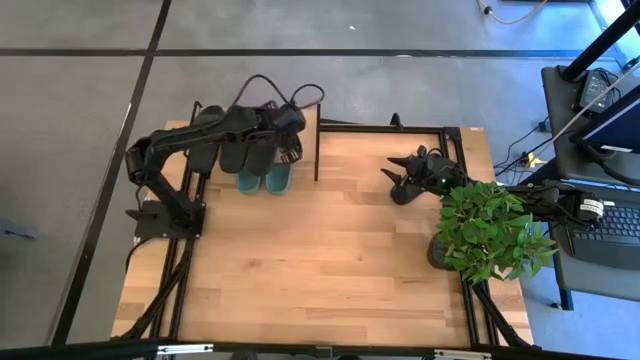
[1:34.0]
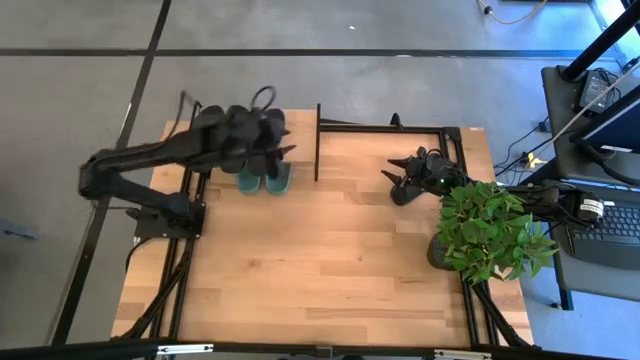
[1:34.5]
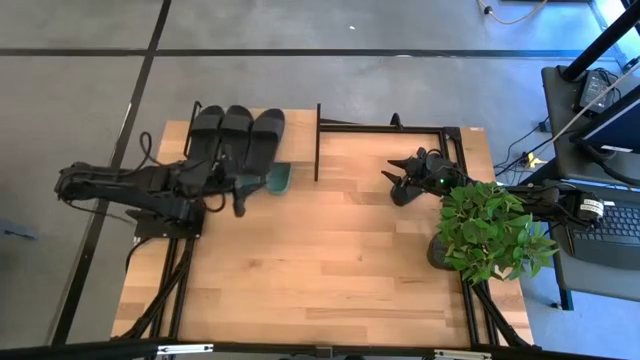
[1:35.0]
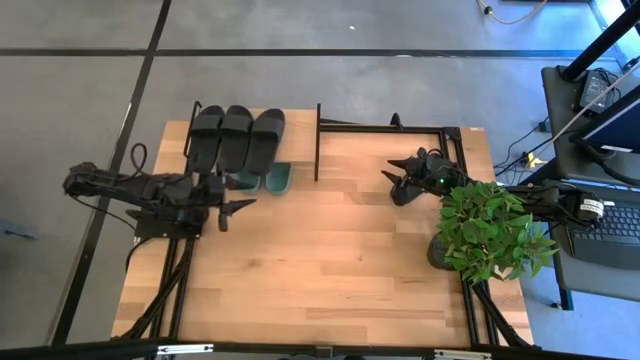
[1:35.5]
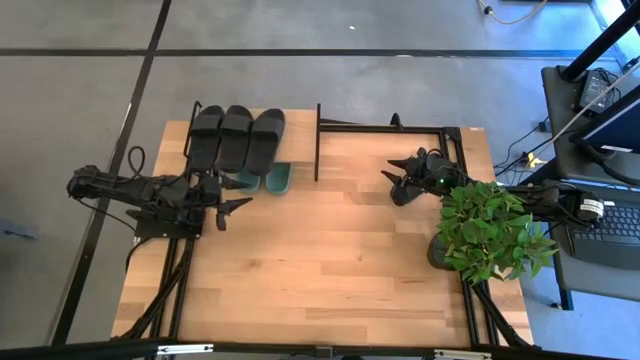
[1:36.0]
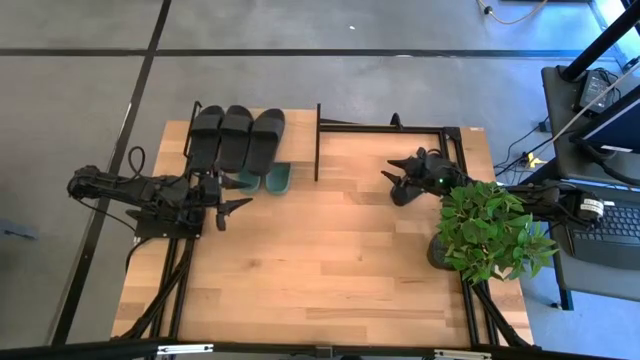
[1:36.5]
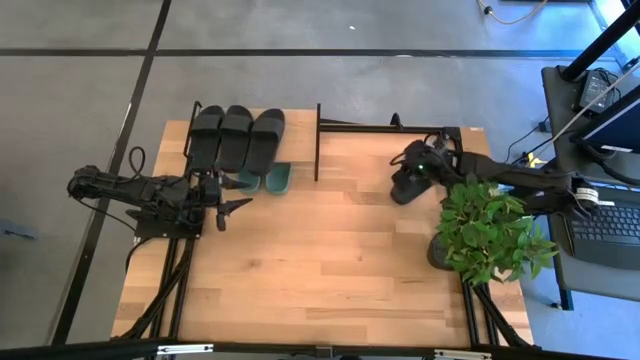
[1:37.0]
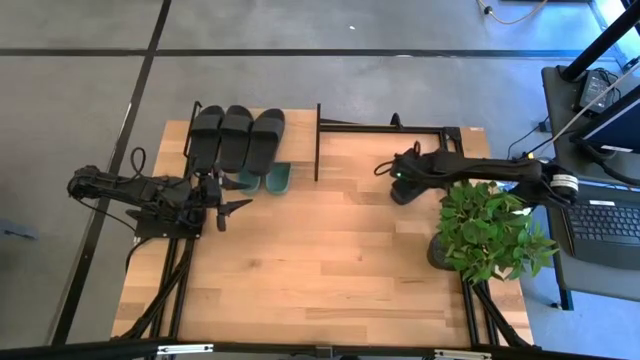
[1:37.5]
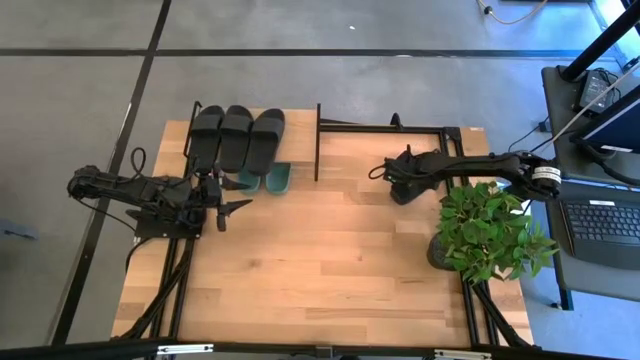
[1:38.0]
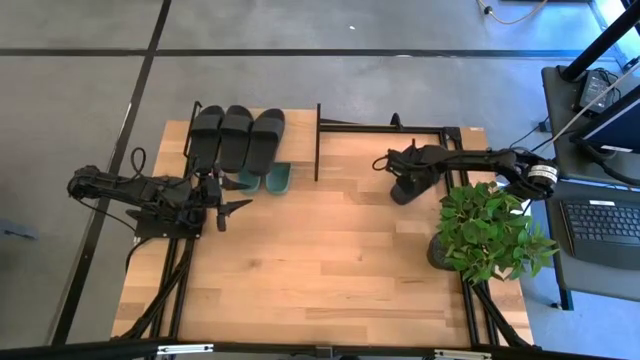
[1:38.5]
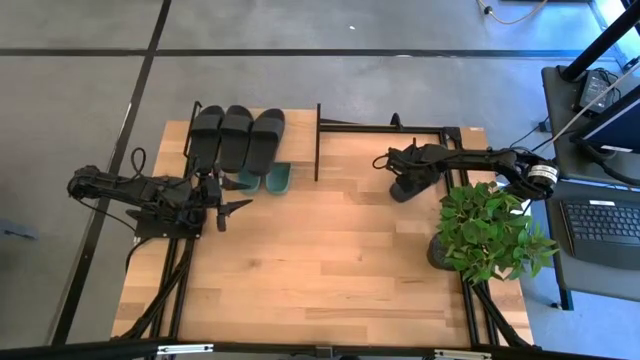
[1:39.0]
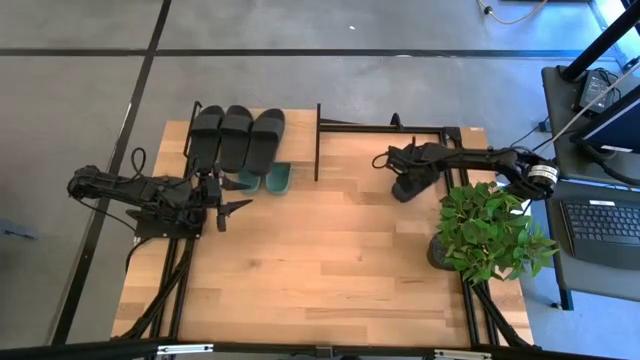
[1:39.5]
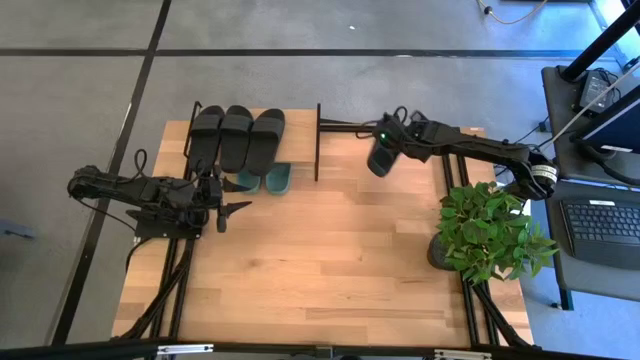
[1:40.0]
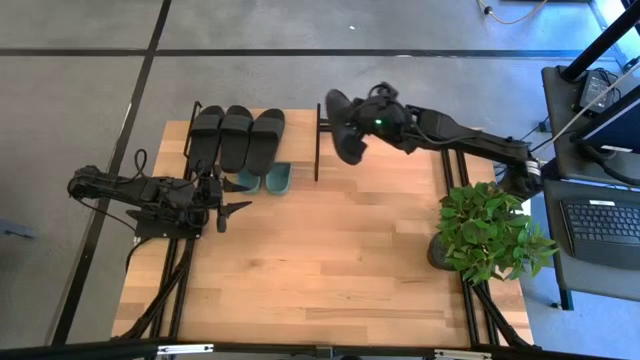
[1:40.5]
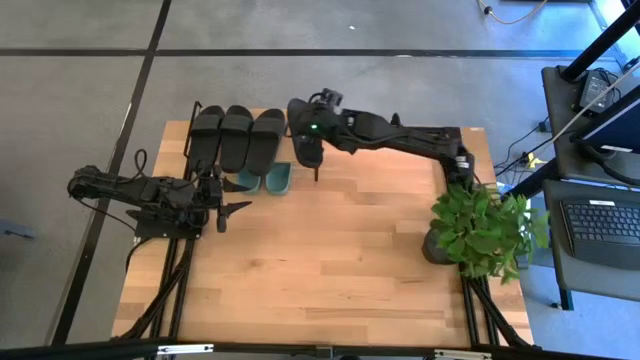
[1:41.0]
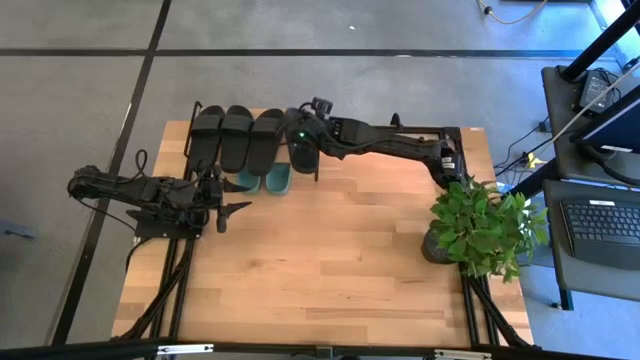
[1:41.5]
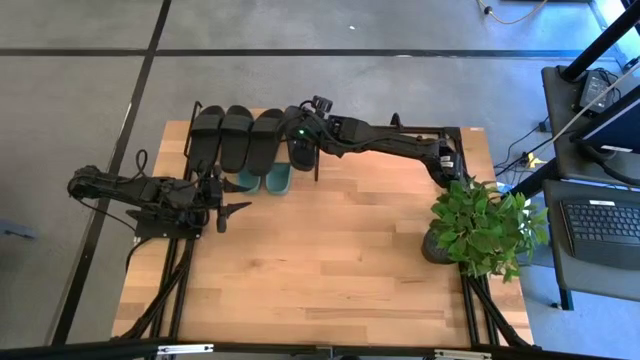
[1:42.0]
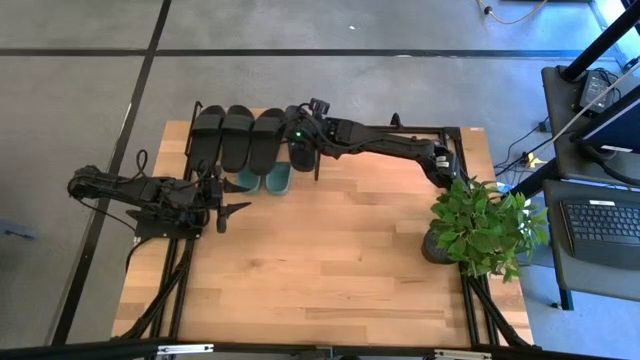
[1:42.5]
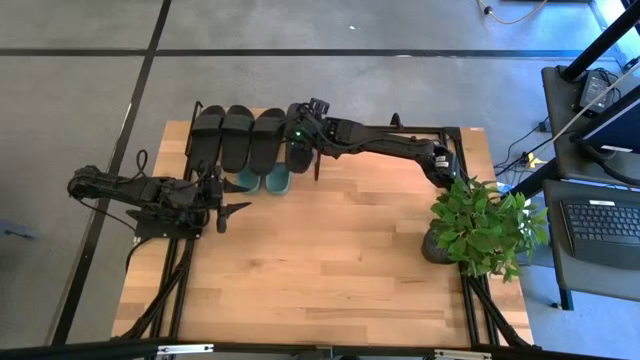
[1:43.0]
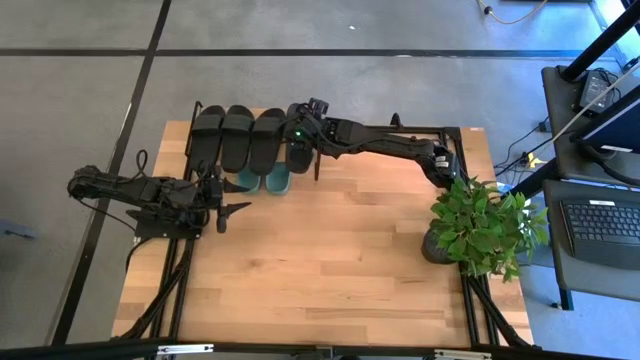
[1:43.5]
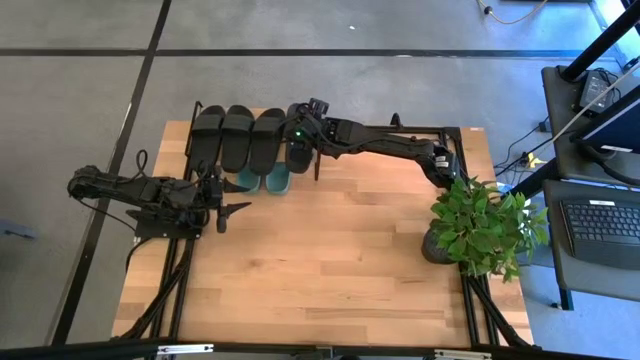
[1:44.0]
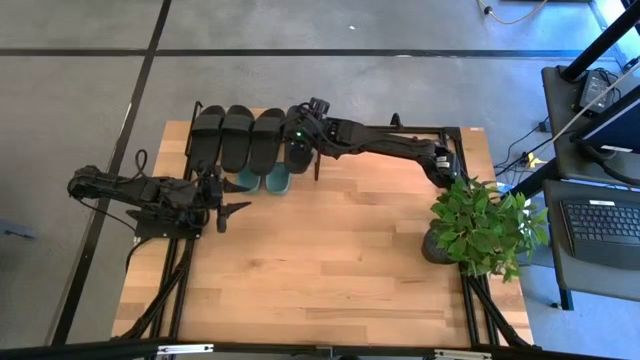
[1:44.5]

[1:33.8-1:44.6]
Task: Pick and place slides into the shelf
Put the black slipper on the shelf

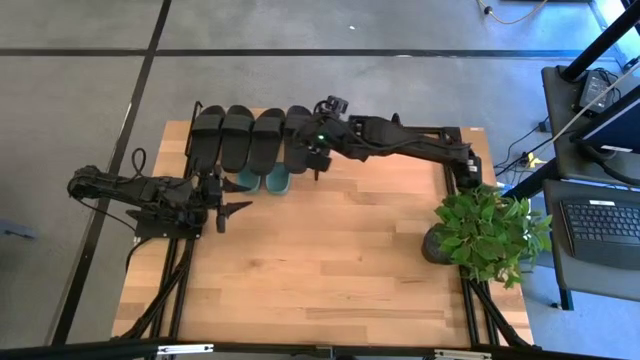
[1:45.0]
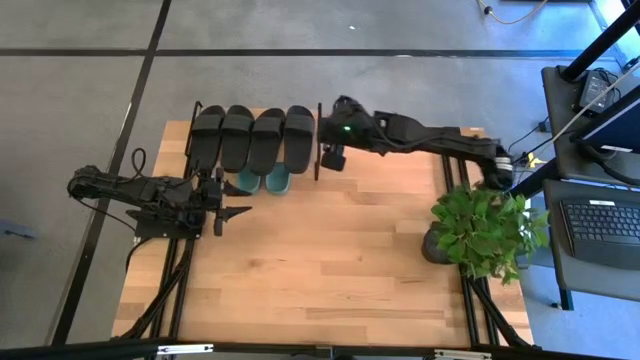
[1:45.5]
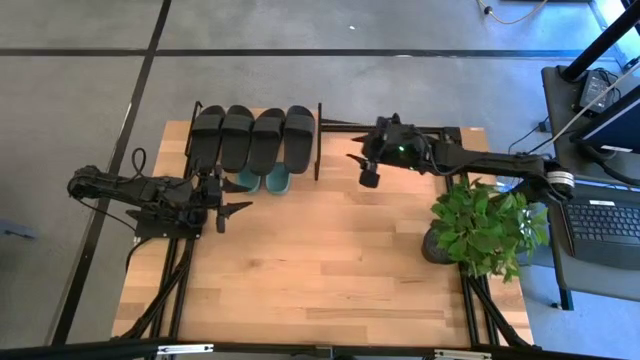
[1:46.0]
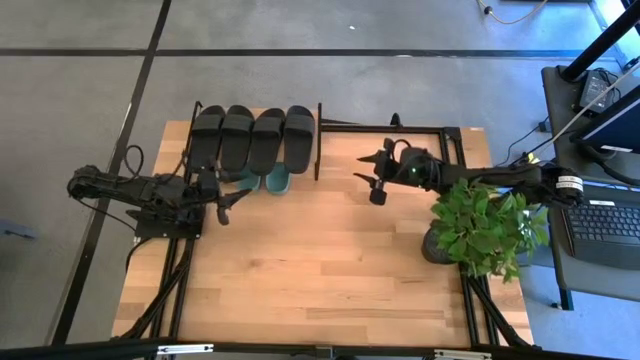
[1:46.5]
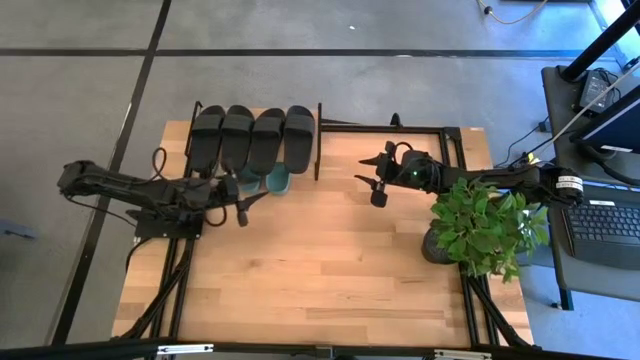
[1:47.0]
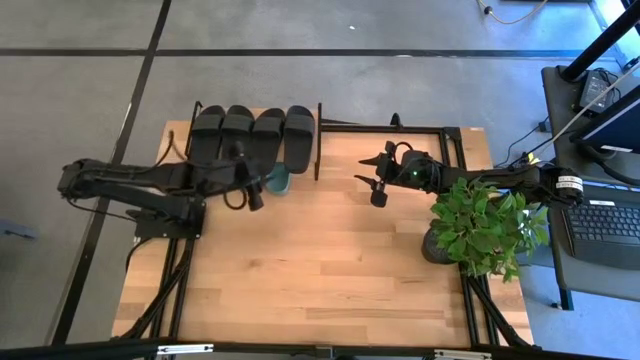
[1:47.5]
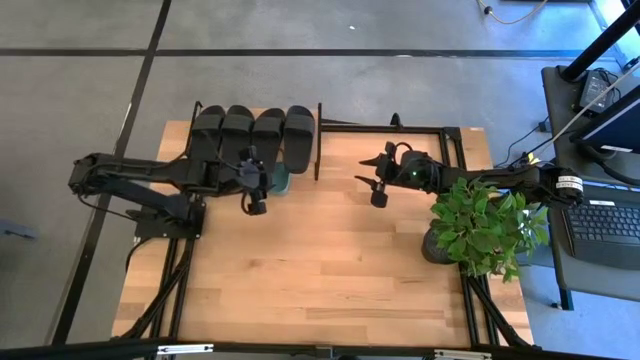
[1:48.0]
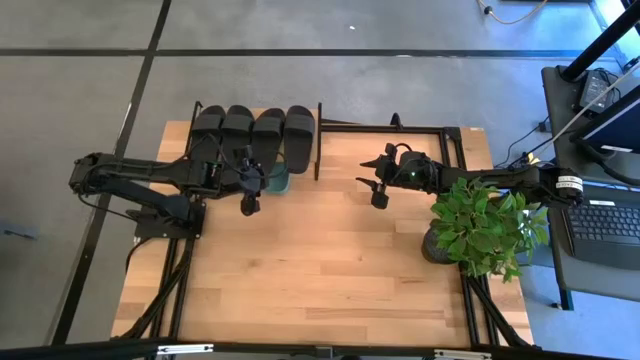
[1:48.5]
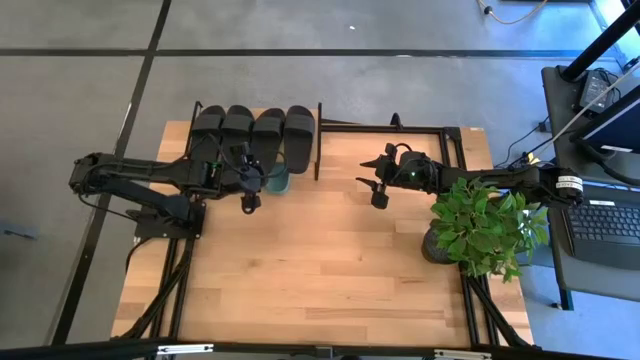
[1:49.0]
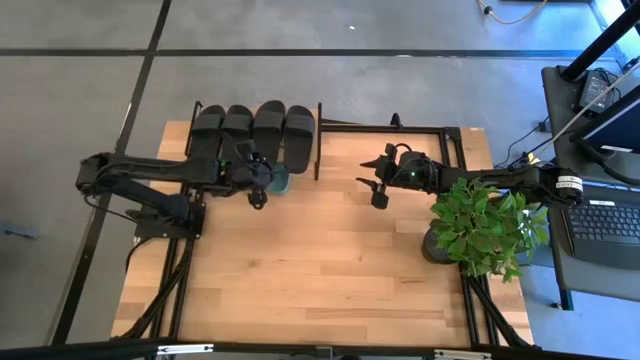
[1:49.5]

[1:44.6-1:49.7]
Adjust the black slipper on the shelf

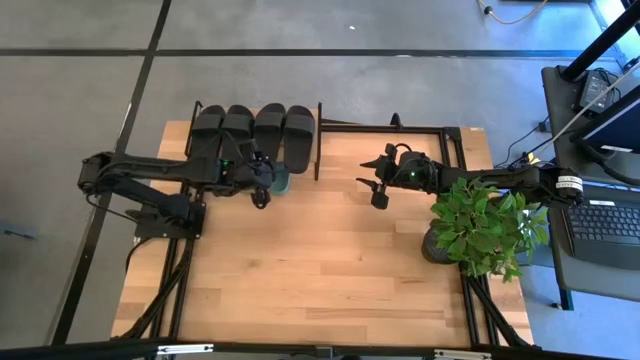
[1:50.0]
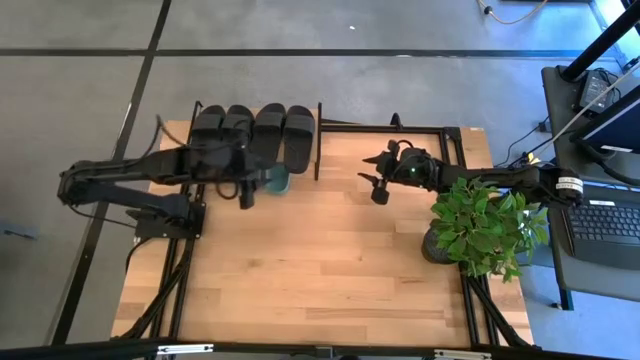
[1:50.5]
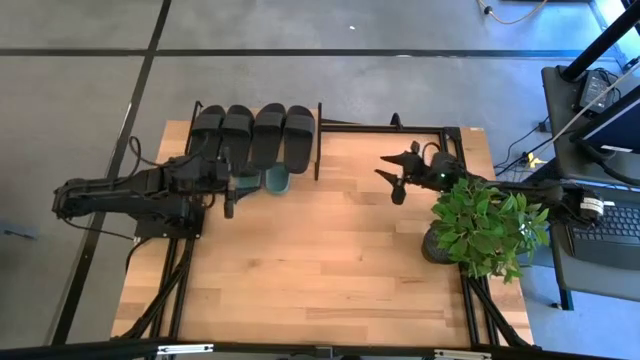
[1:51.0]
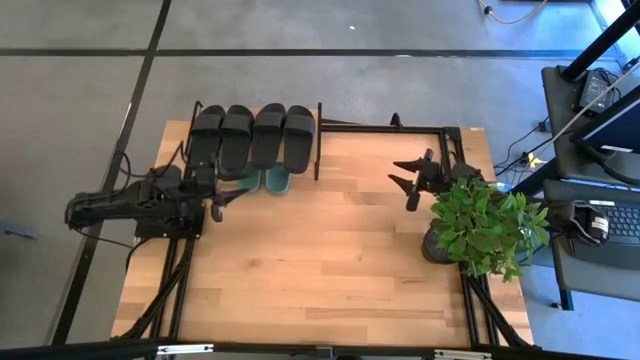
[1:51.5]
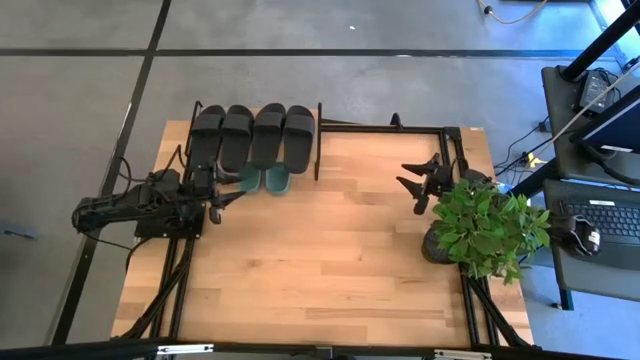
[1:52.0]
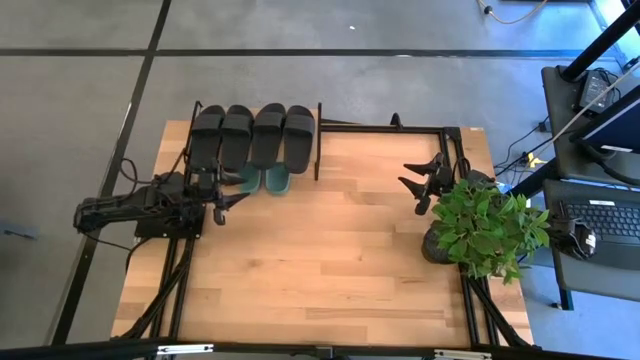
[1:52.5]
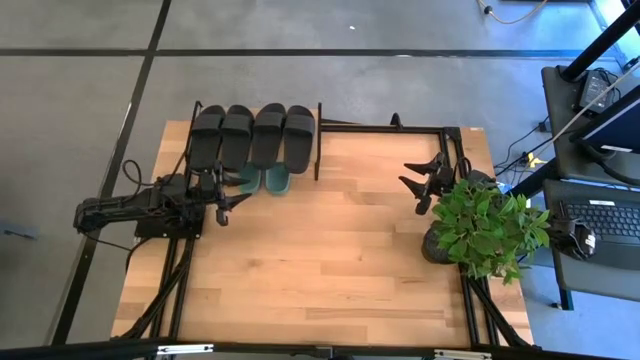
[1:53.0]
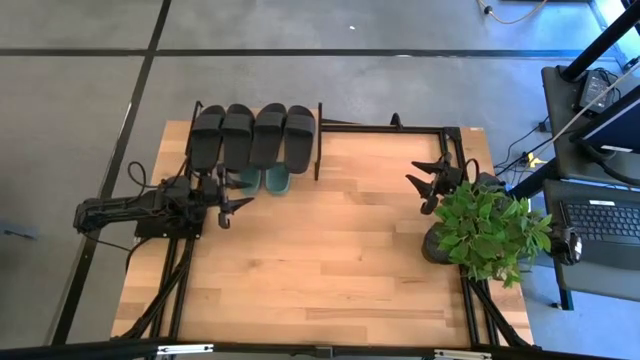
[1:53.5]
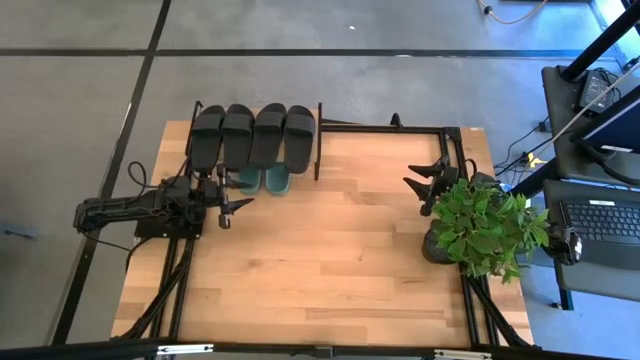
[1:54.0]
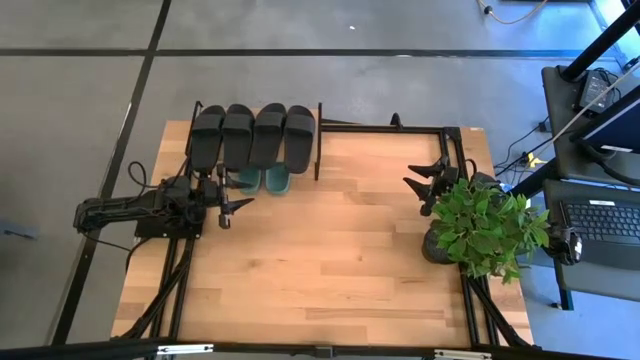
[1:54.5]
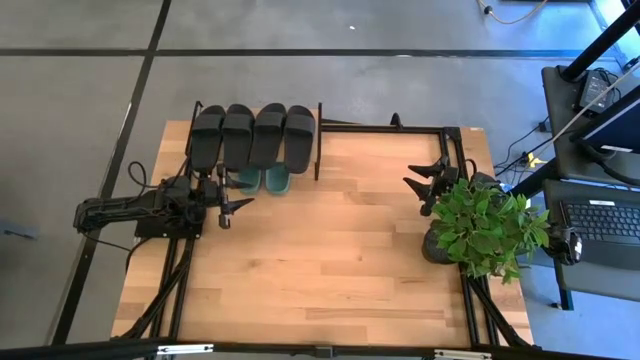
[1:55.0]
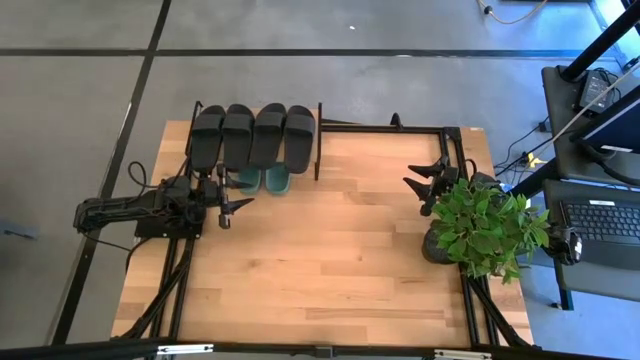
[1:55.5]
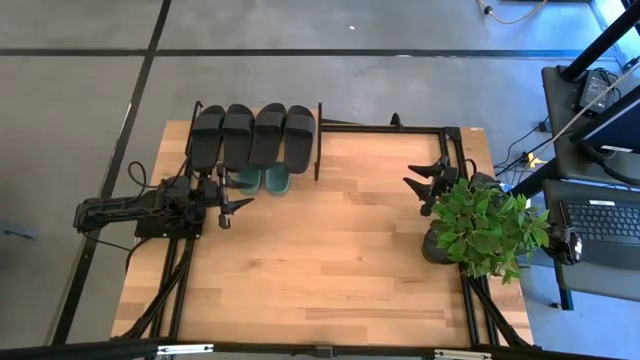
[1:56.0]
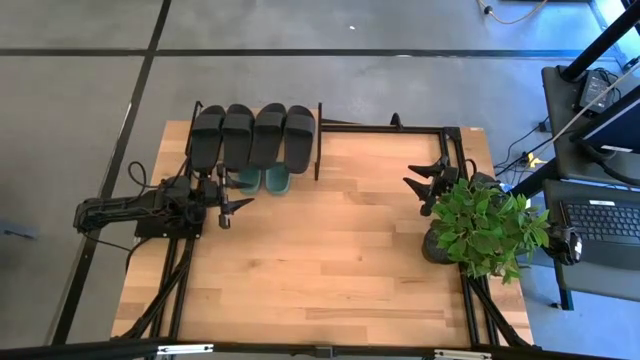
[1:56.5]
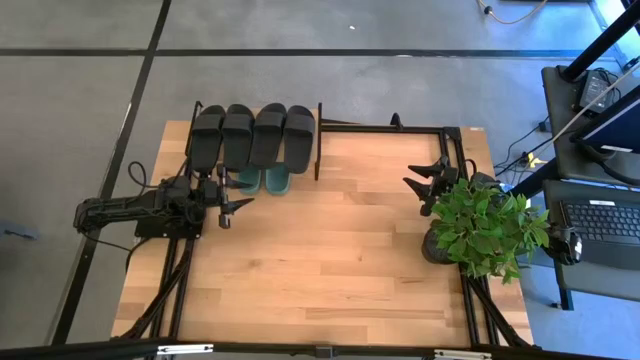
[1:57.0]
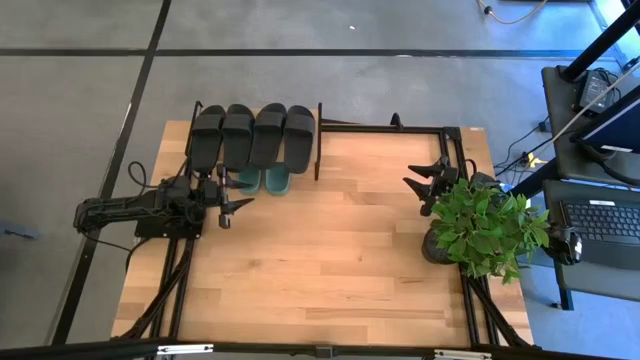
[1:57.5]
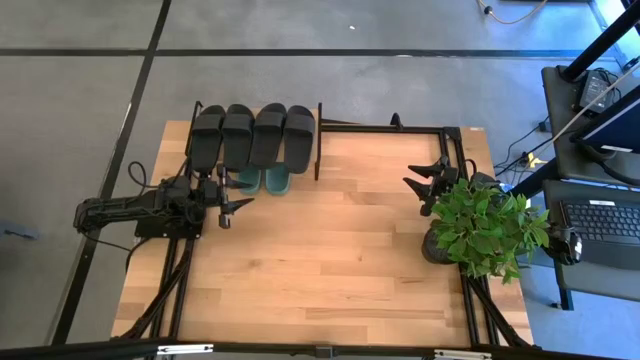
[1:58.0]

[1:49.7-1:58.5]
Return to Home Position
